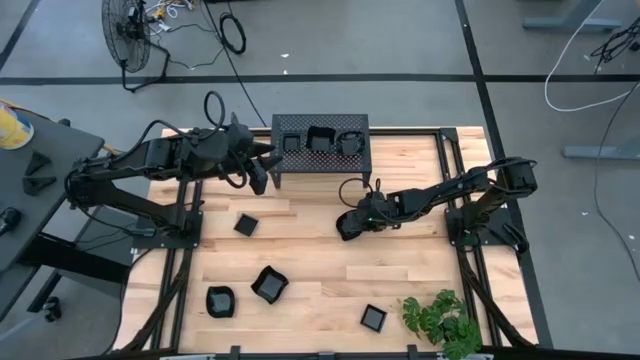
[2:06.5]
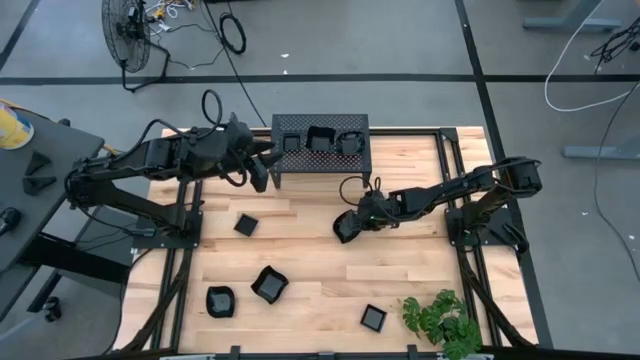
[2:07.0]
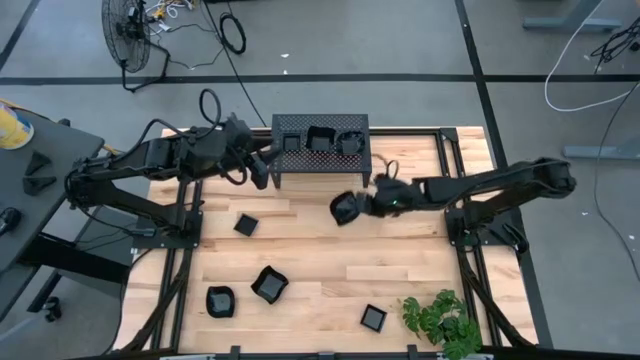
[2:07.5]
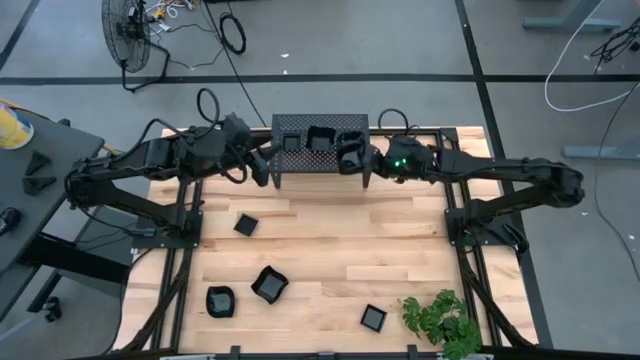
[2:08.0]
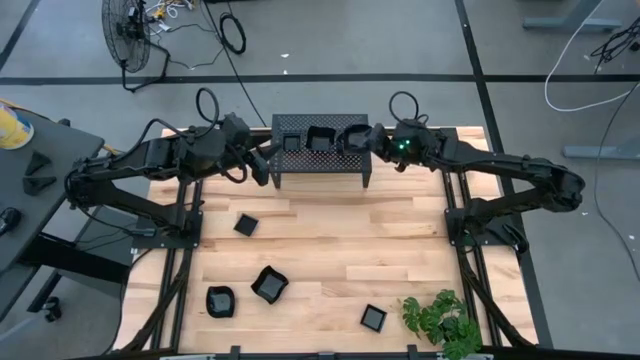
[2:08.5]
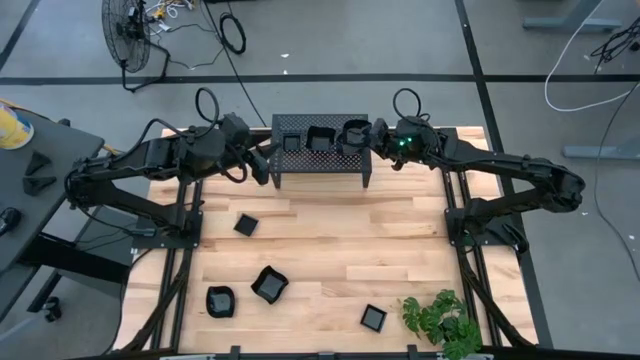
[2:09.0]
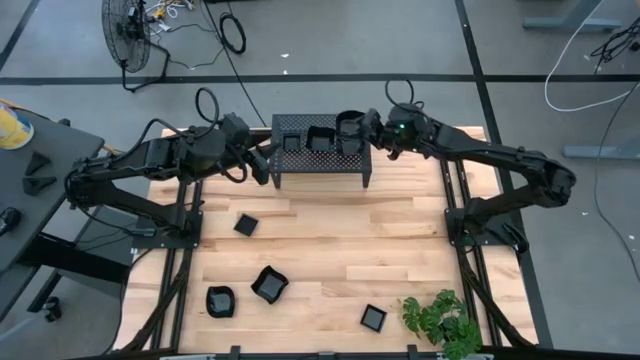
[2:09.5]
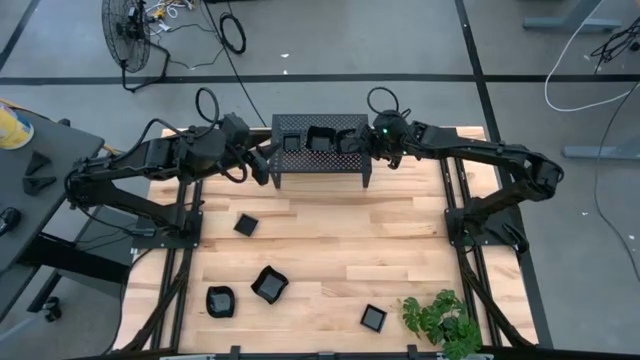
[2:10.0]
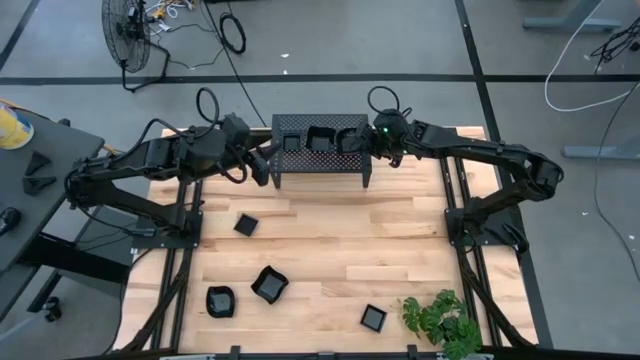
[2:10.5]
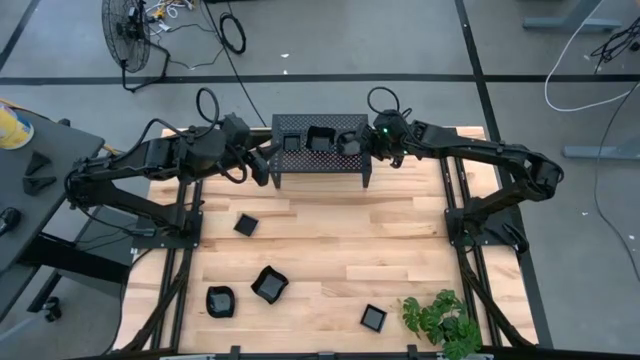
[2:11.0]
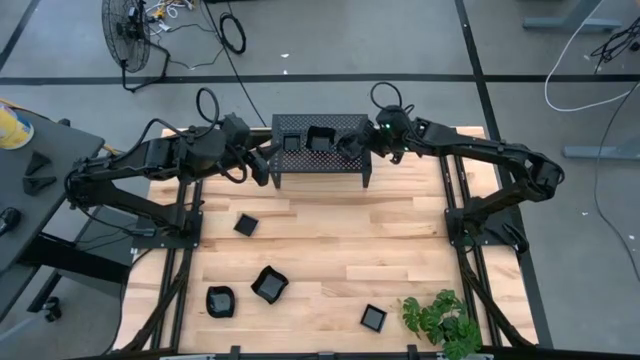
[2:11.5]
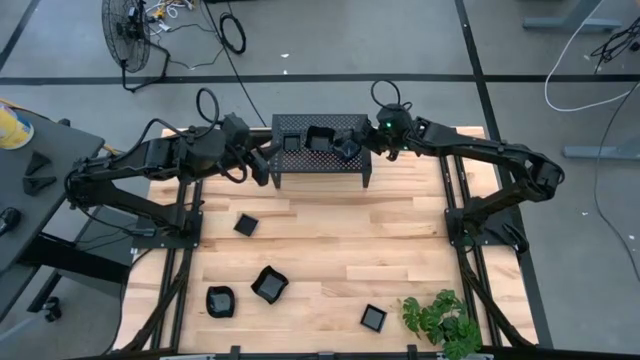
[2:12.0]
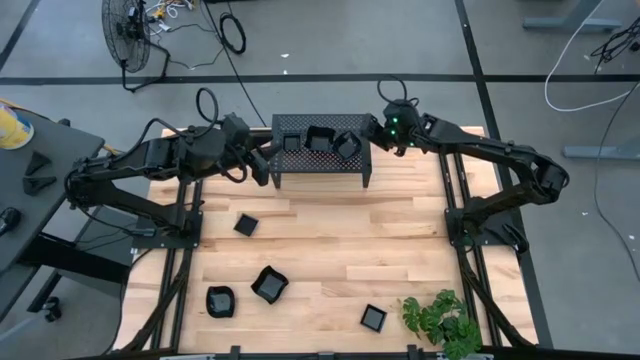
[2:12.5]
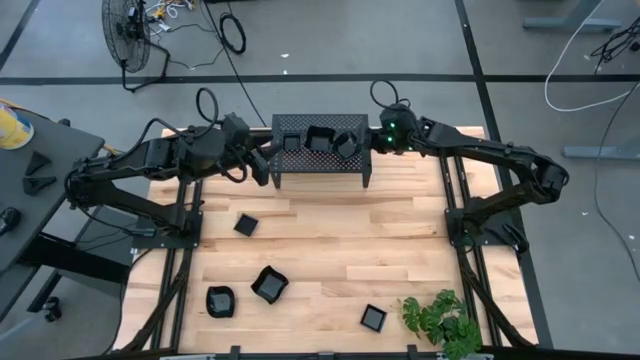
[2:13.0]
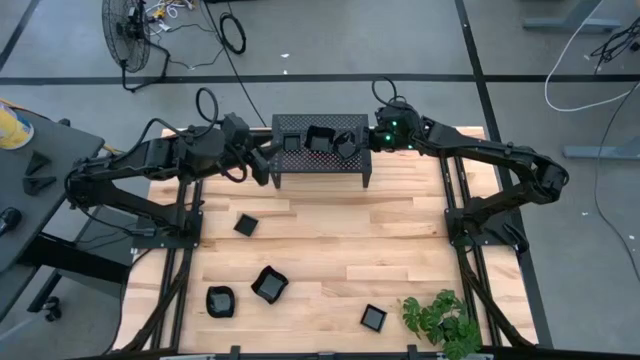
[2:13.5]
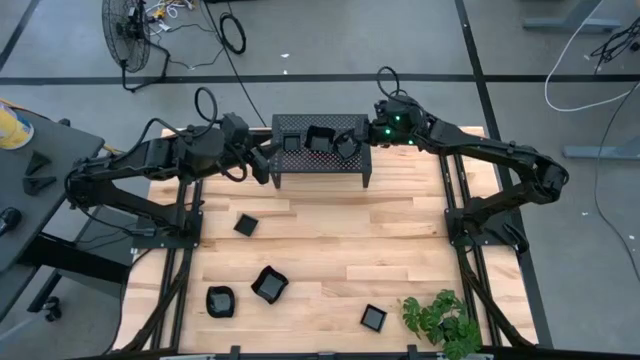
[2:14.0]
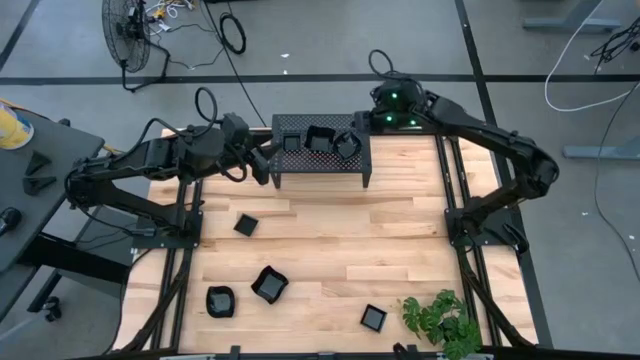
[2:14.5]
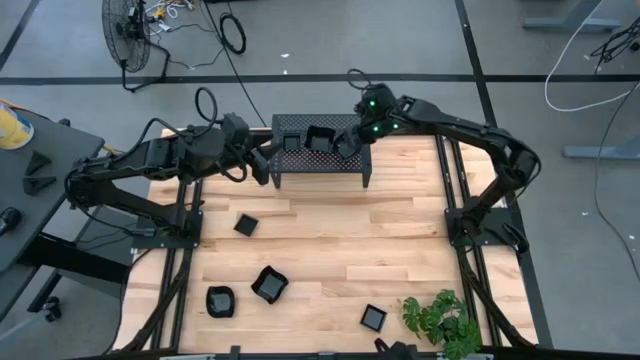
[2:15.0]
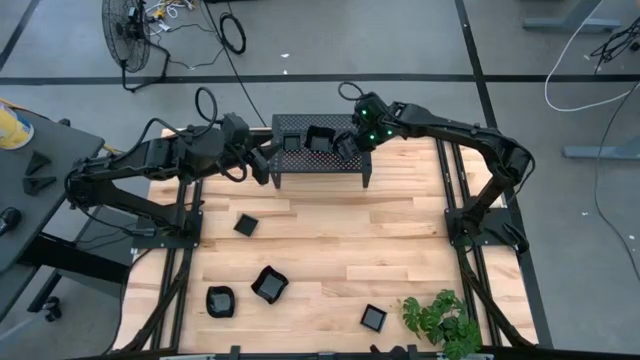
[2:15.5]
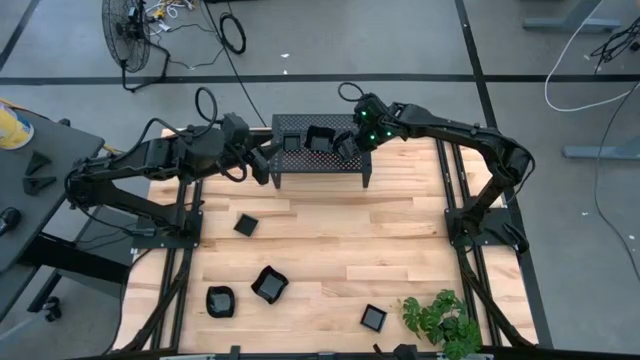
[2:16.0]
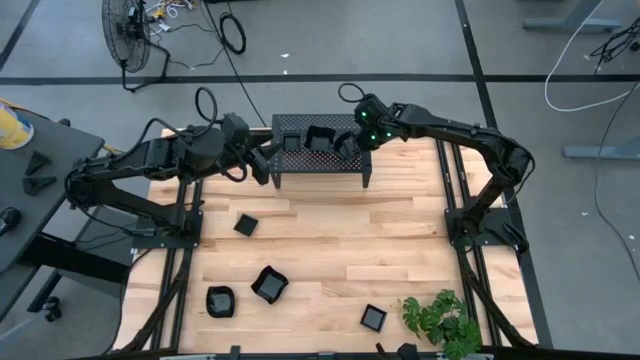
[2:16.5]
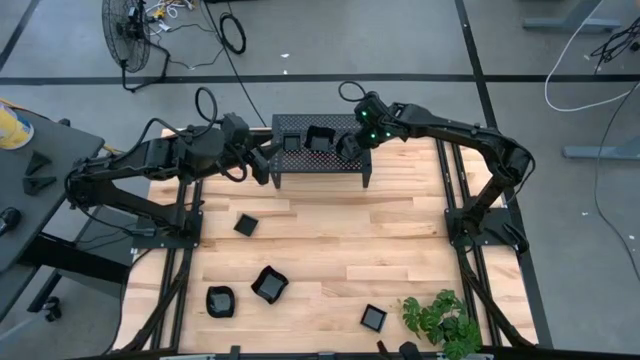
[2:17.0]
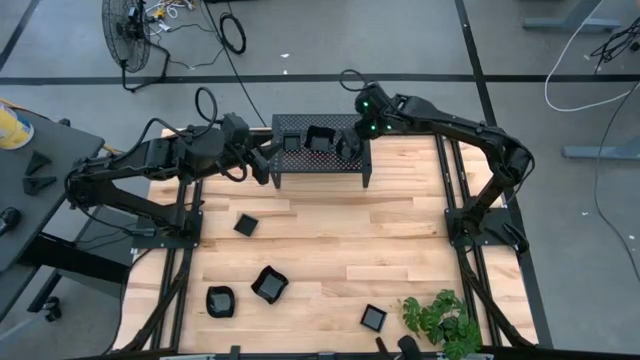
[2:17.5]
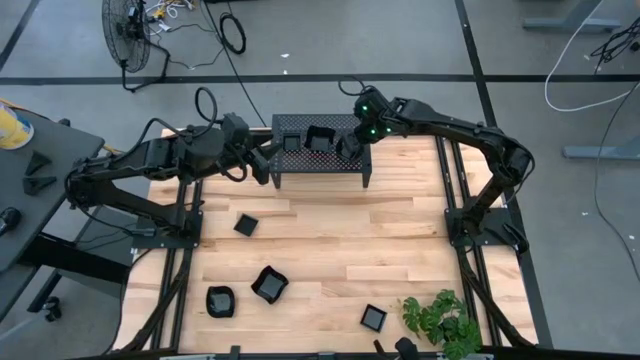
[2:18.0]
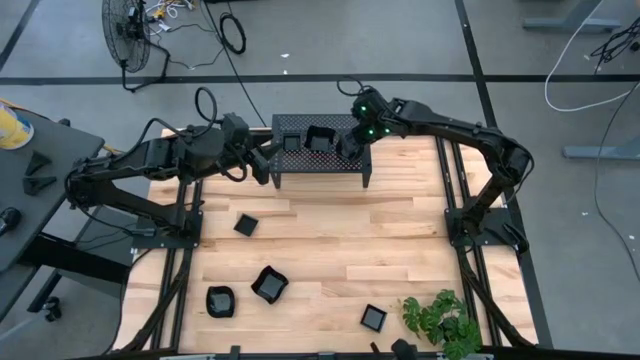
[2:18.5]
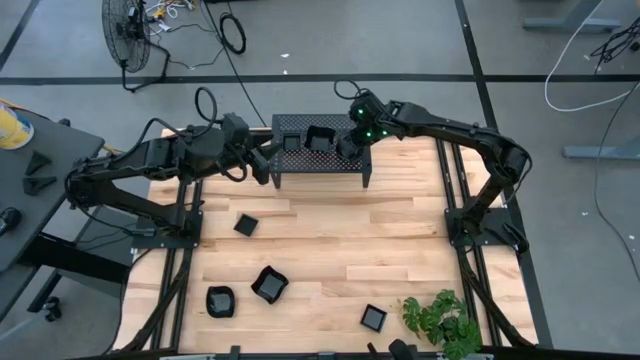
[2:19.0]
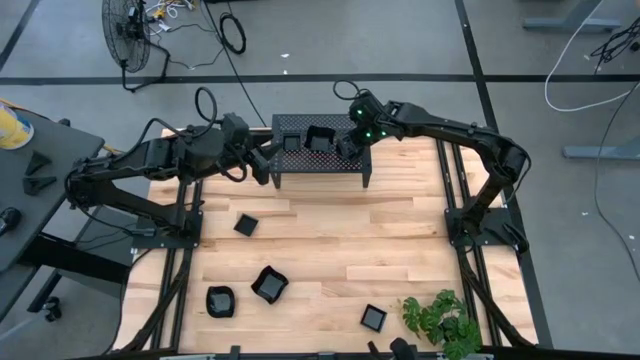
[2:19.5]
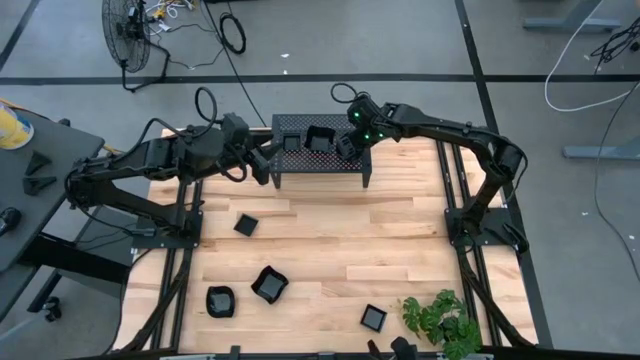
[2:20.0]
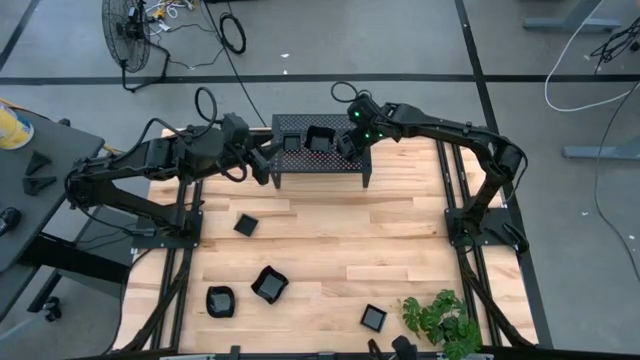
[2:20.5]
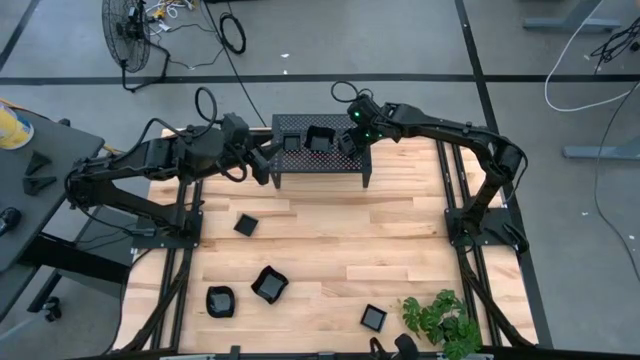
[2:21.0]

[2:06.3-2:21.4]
Task: Pick & Place Mini shaped plates
Stack the leaf shaped plate on top of the other leaf shaped plate on the shelf

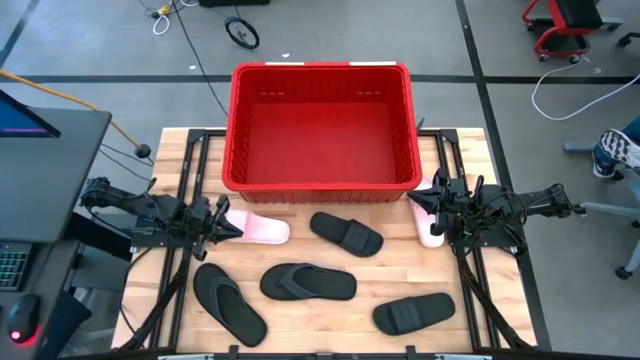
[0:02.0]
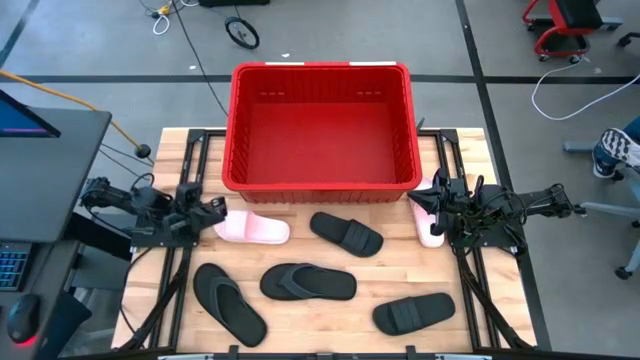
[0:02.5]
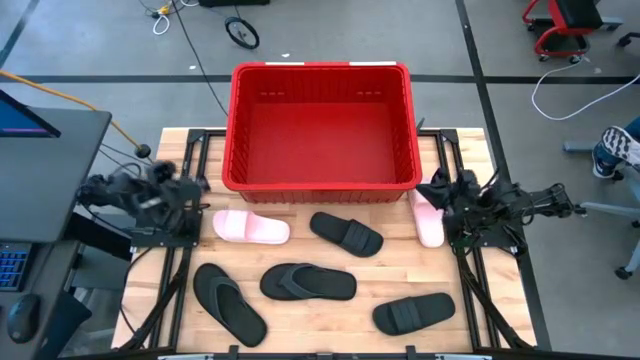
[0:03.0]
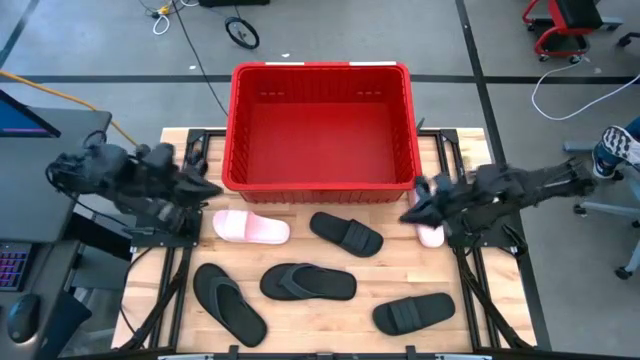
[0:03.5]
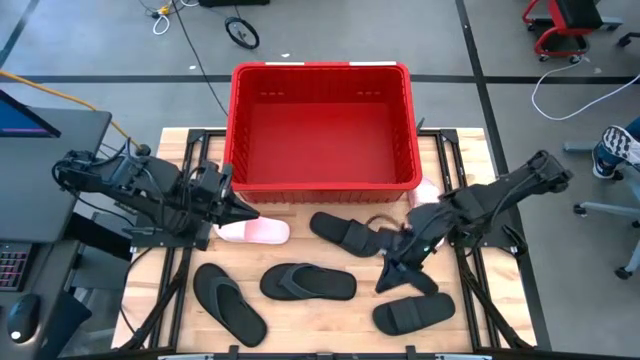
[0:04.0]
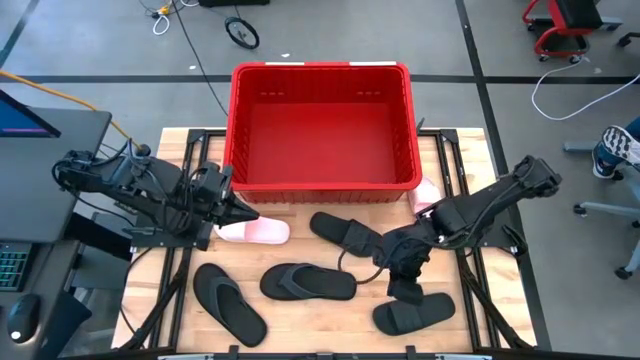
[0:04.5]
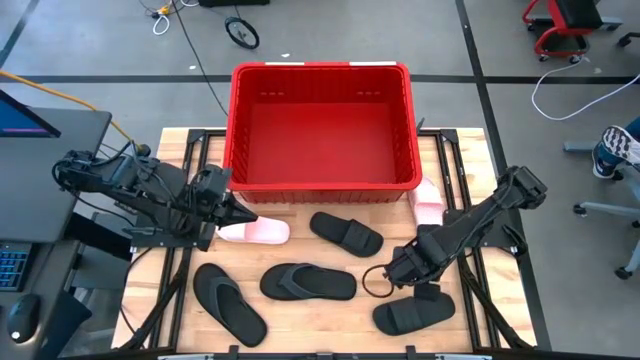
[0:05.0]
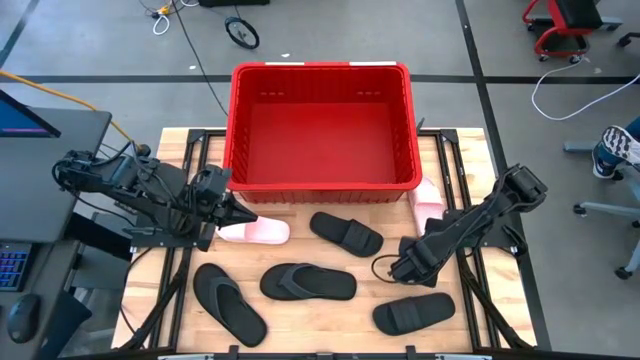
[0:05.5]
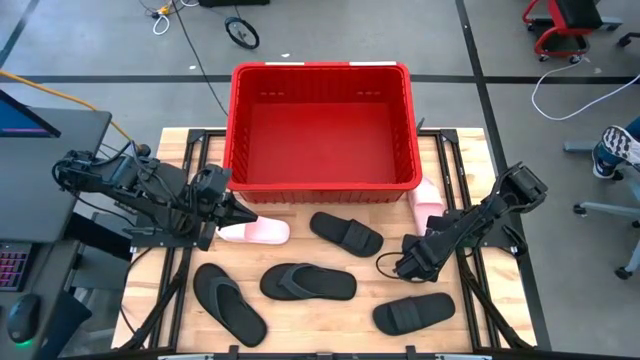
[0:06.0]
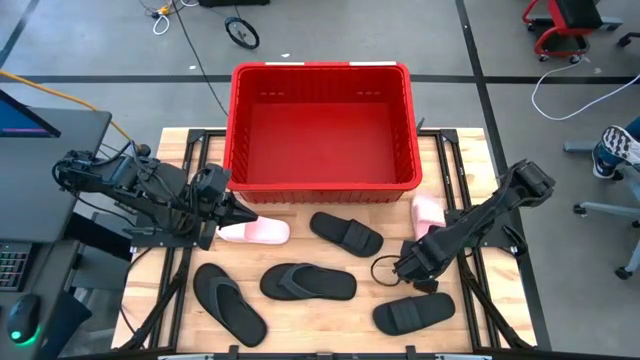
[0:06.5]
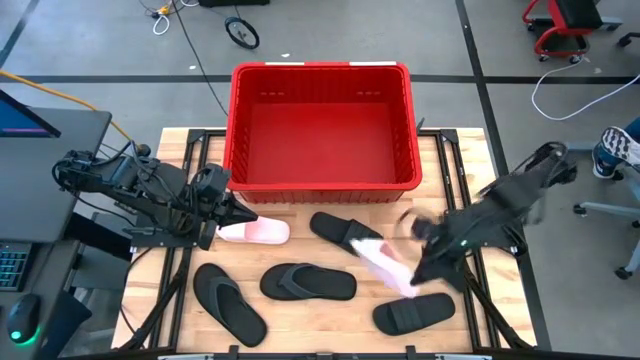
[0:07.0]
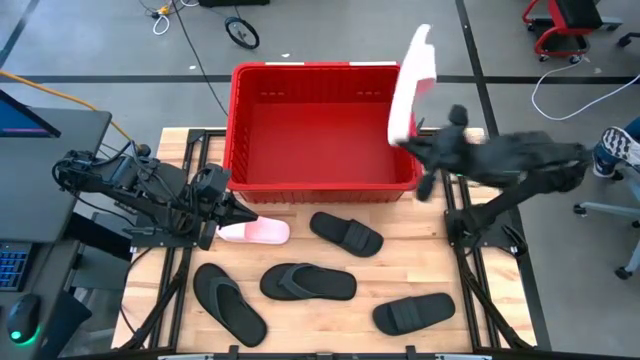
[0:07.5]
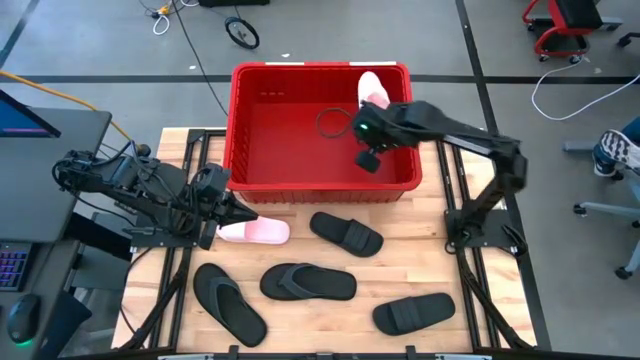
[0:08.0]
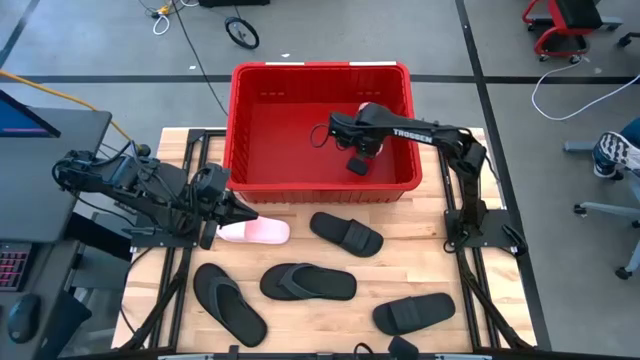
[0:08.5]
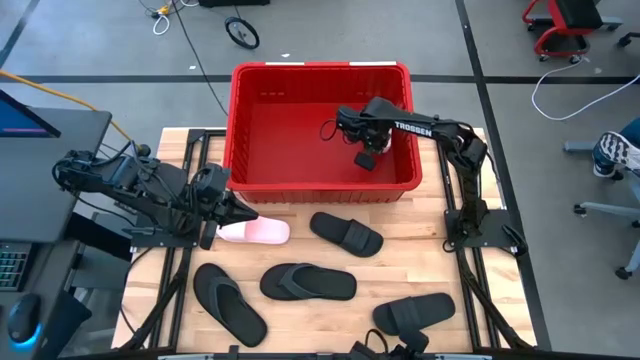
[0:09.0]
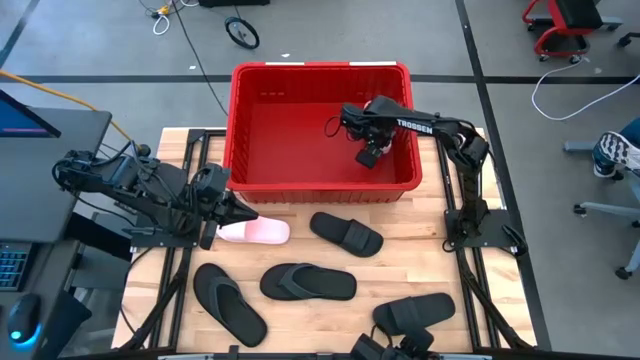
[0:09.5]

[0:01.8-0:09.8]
Task: Pick and place slides into bin
Put the right pink slide into the red bin
